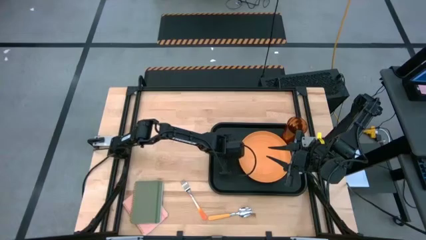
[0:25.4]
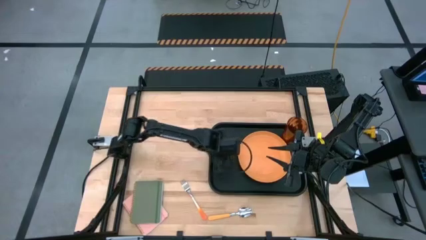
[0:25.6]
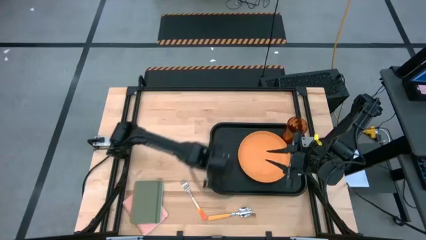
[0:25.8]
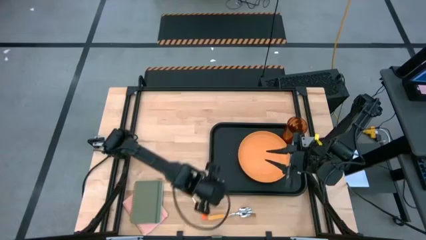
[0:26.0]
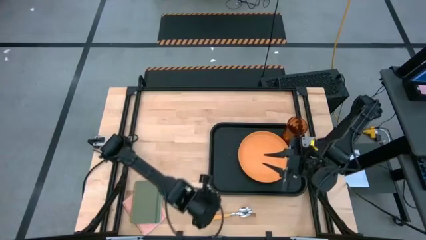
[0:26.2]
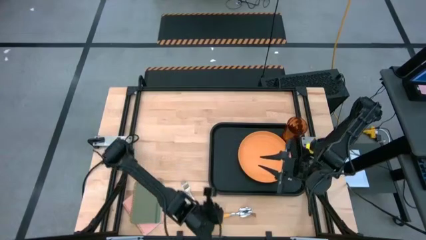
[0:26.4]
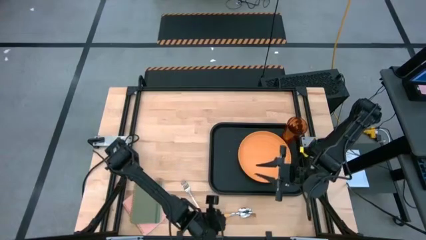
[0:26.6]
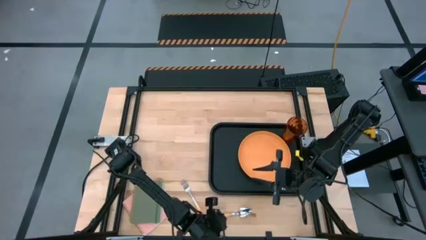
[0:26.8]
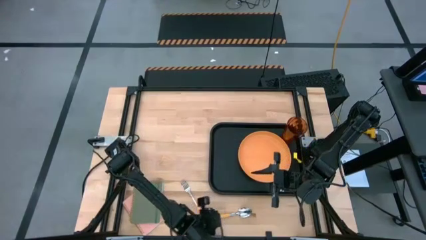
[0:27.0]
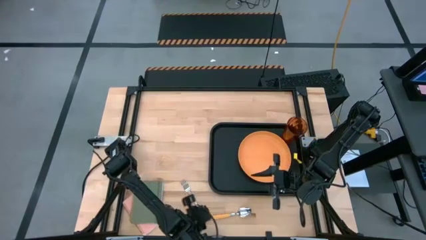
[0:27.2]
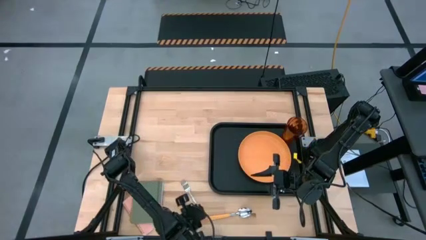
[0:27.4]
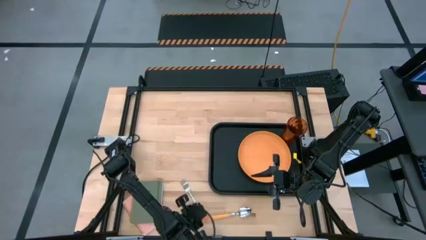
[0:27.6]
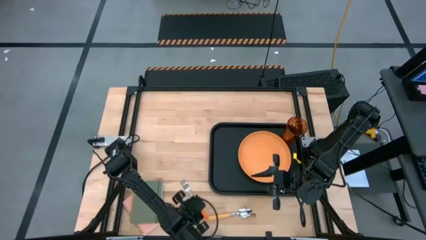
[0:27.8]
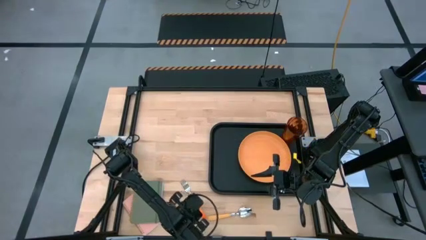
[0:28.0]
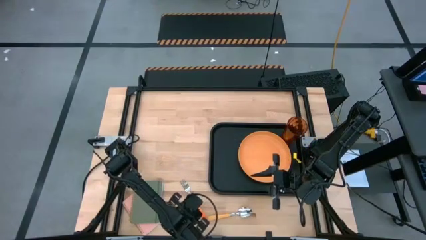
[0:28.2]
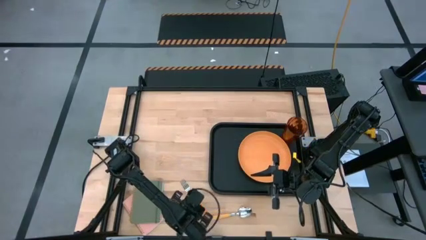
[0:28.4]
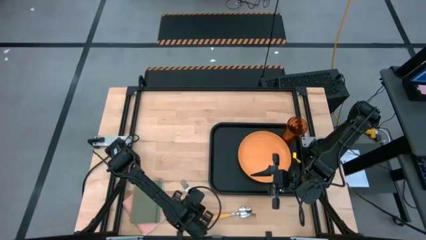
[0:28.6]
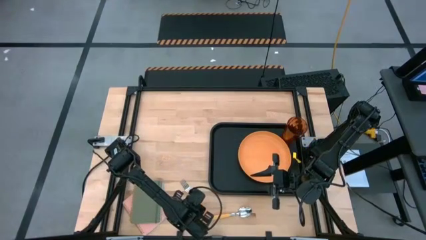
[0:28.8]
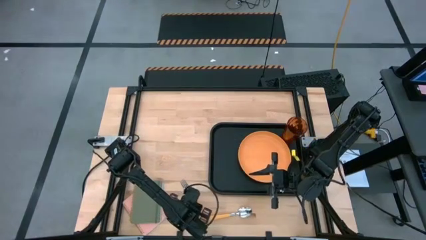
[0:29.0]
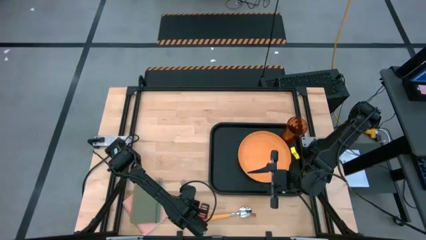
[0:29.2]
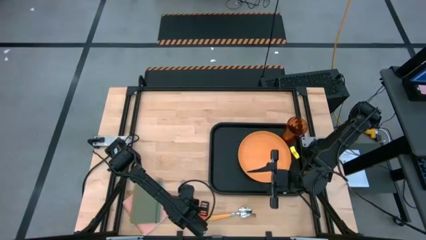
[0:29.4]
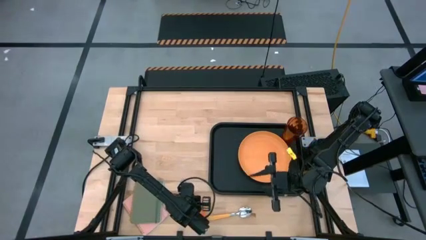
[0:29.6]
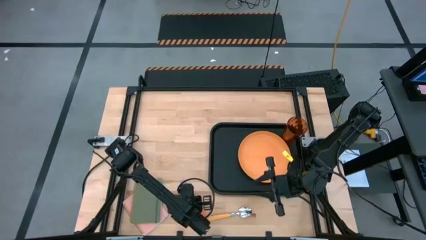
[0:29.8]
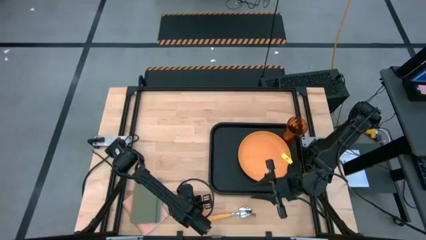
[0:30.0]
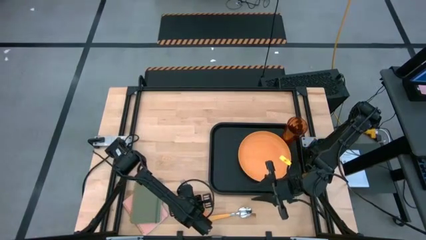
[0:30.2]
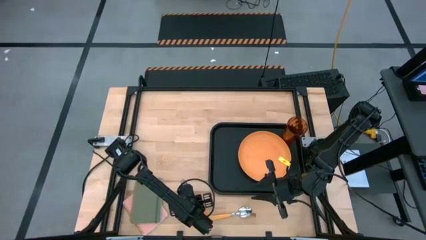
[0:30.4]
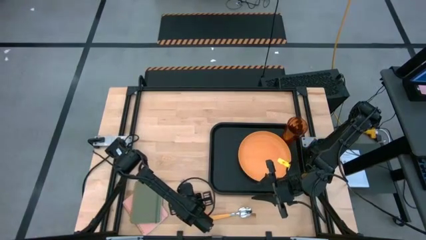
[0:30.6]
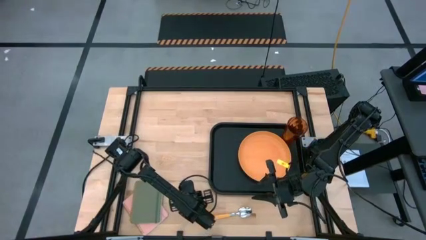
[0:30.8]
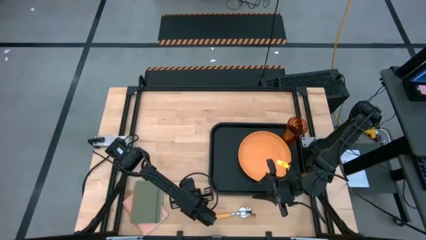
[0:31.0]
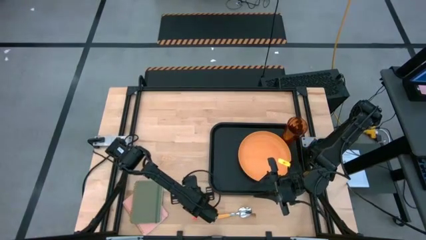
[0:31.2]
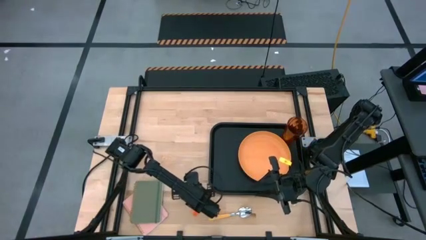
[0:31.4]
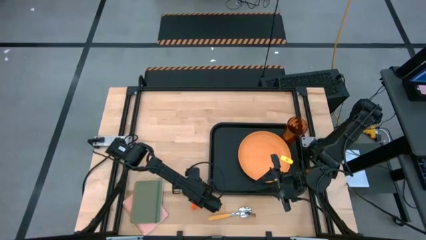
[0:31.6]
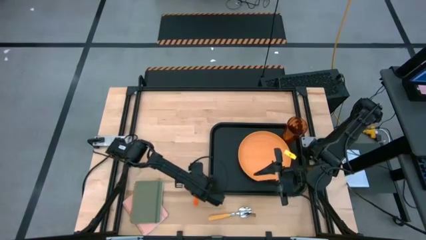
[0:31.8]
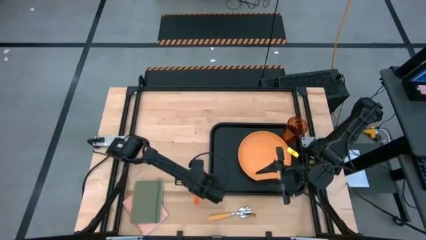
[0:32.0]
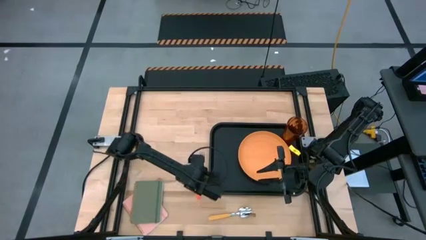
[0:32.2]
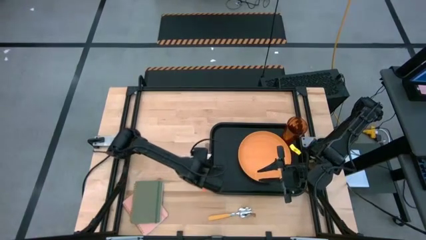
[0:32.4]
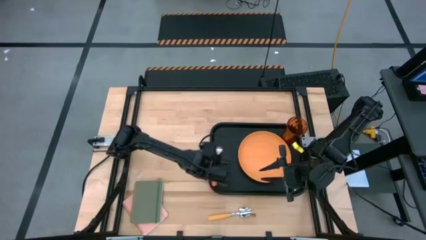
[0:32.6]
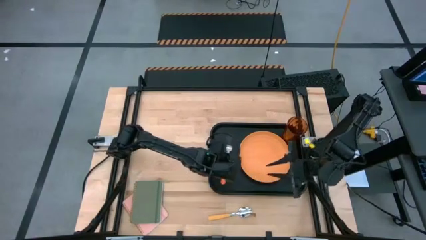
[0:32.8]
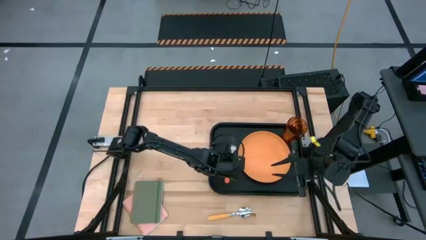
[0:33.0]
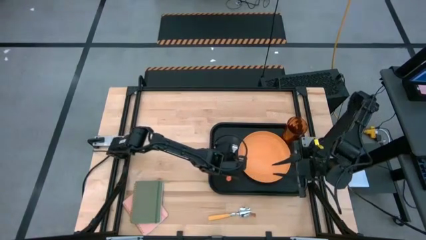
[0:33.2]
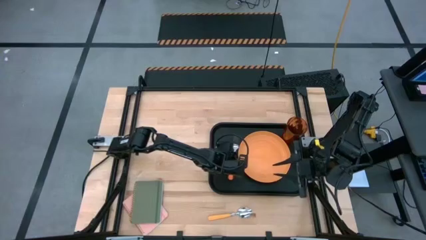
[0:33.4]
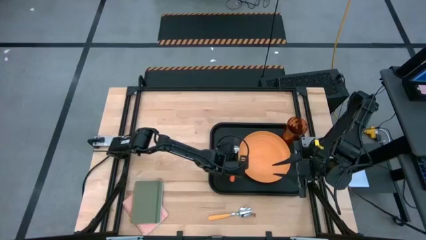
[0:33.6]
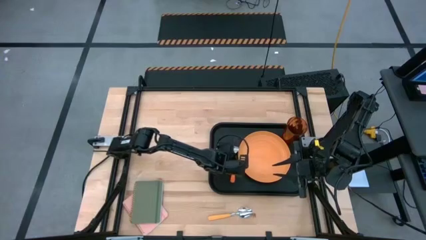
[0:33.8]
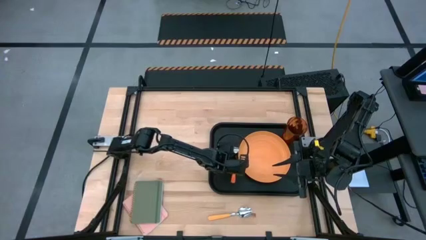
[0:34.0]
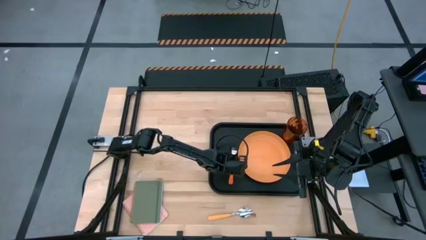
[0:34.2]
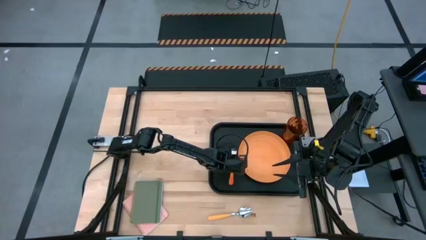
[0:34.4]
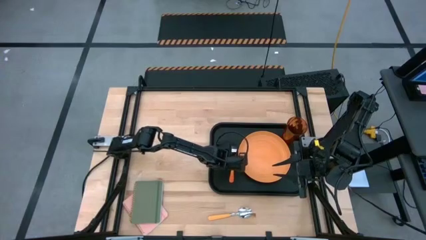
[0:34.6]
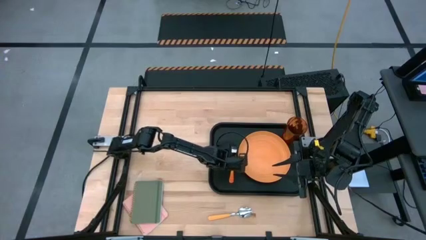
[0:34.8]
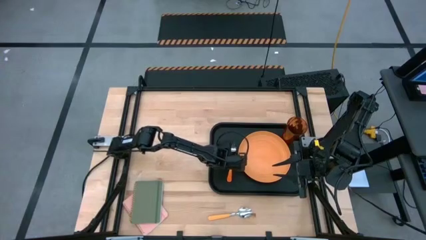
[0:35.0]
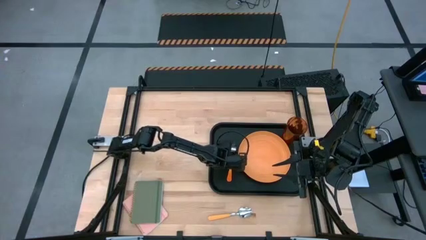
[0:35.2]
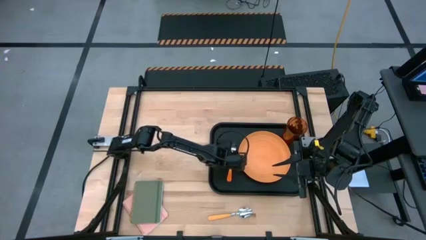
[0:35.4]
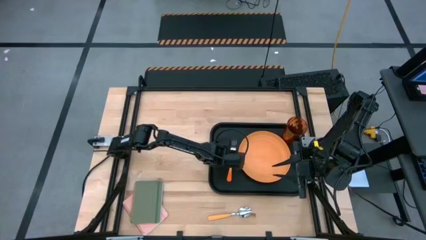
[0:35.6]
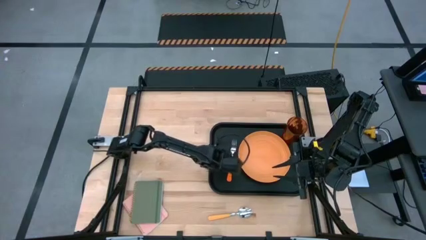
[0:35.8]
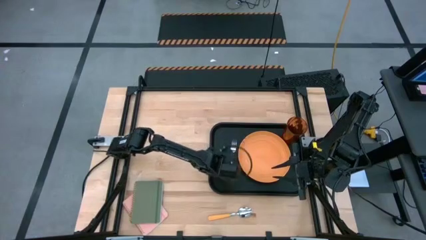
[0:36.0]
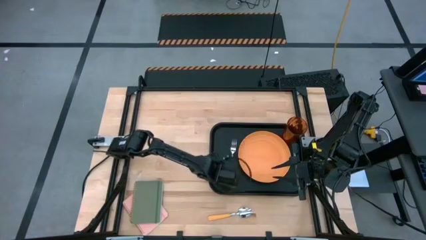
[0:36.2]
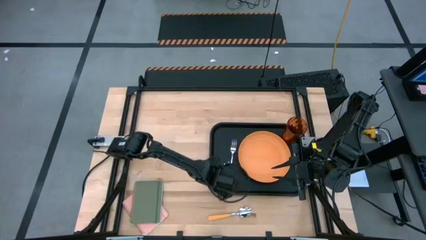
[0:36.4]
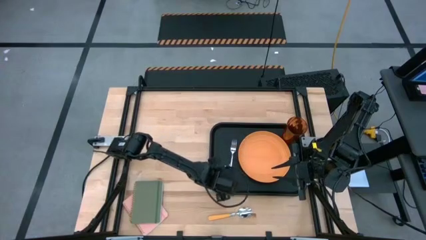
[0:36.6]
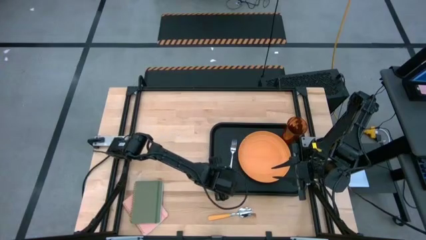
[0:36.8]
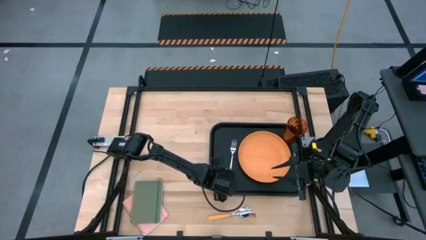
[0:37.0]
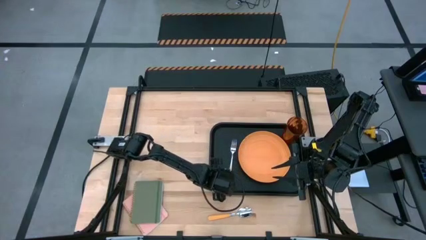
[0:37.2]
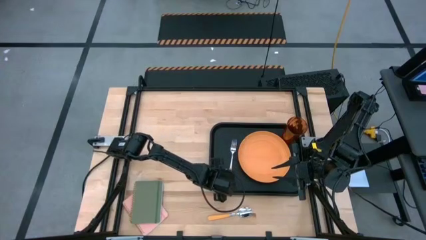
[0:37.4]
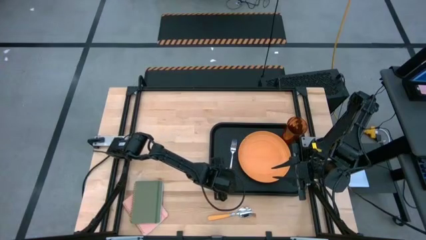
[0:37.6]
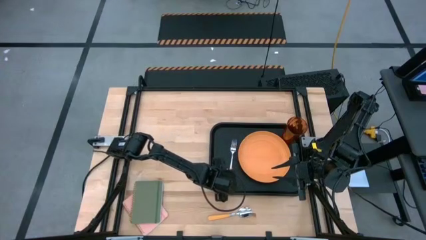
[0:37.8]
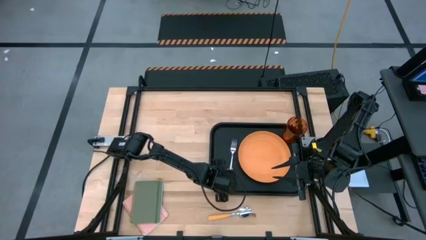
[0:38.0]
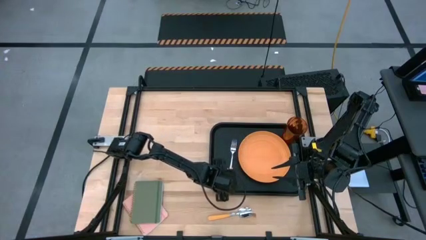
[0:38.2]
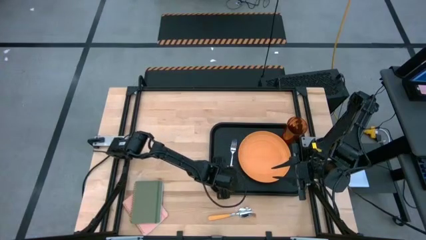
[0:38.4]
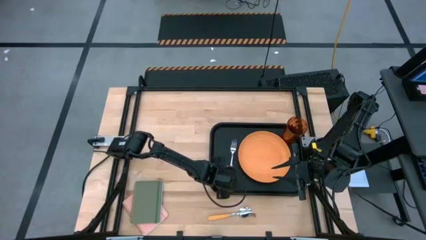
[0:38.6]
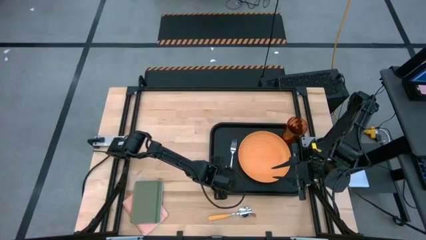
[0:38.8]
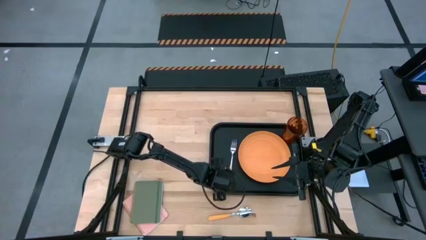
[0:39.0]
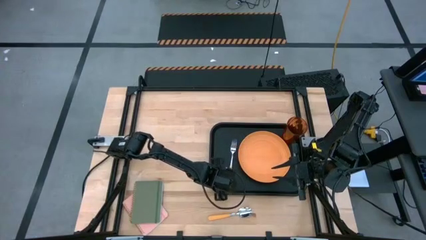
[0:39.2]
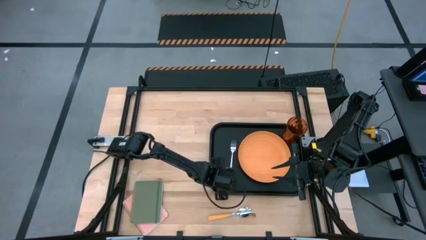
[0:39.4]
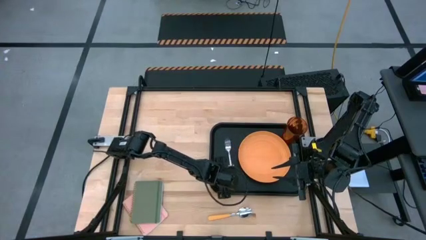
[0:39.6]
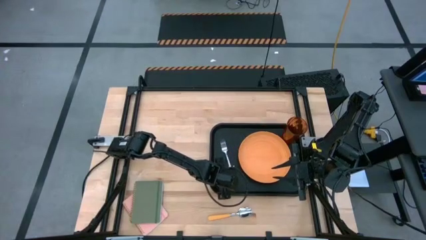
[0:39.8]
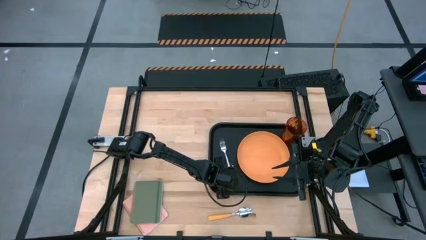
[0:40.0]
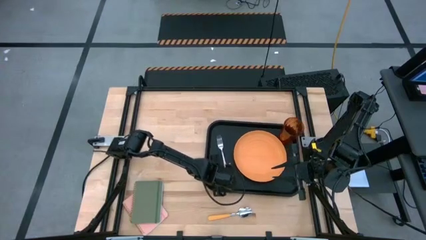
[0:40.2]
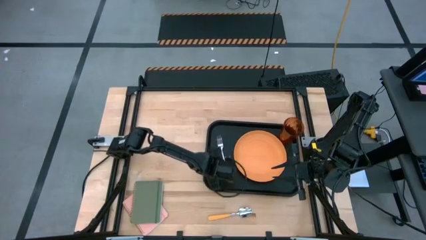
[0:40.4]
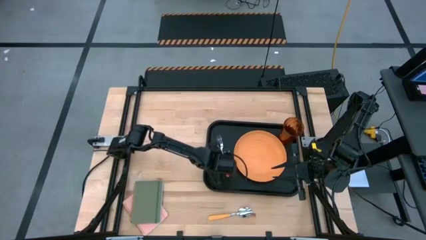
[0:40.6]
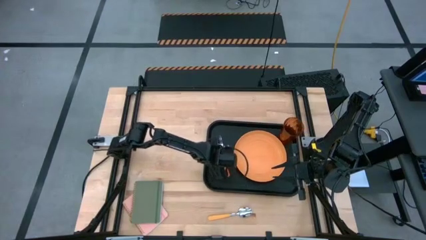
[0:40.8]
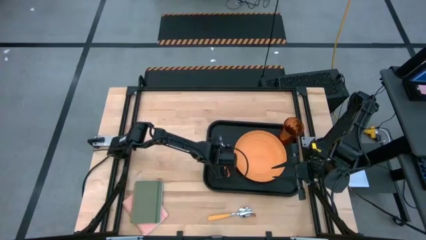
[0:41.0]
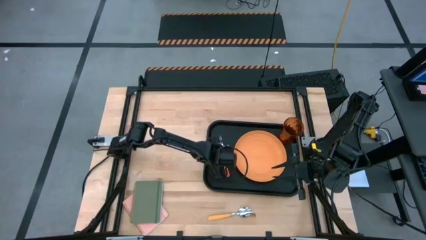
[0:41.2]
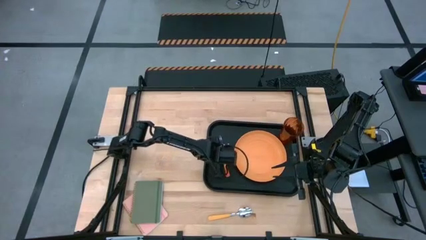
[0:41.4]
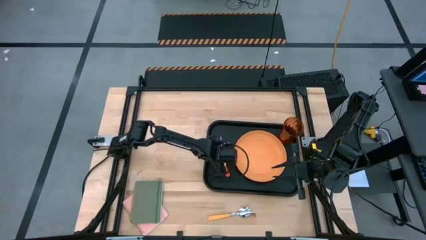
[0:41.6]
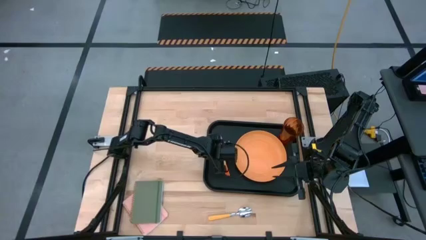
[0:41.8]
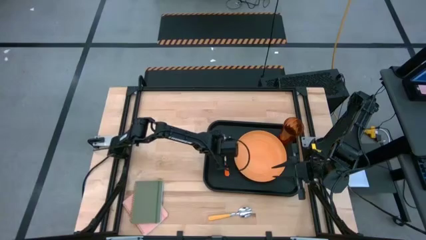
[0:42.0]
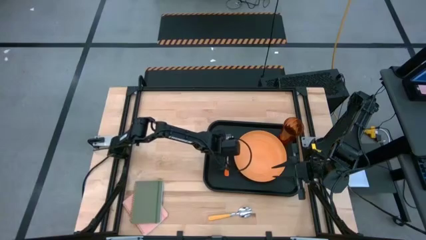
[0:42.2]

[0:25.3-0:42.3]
Task: Pick and place plate/cup/fork/spoon on tray
Put the orange fork on the black serving tray to left of the orange plate
